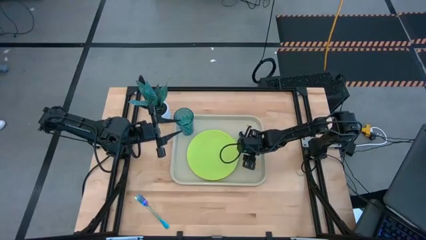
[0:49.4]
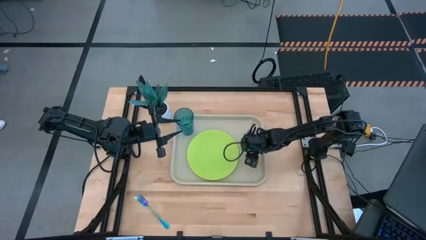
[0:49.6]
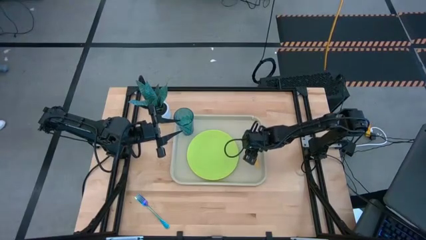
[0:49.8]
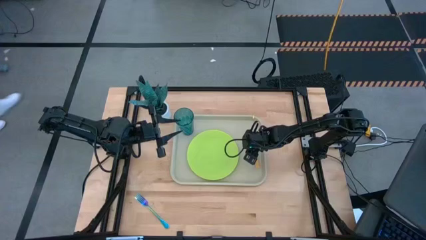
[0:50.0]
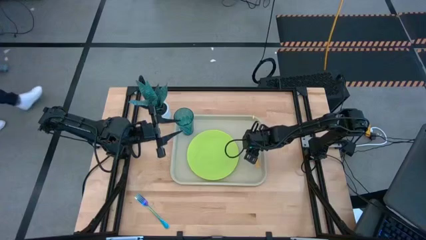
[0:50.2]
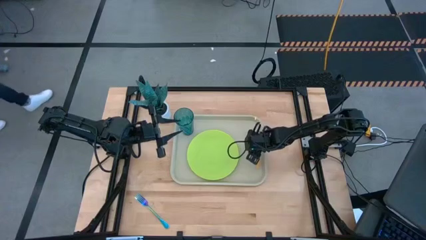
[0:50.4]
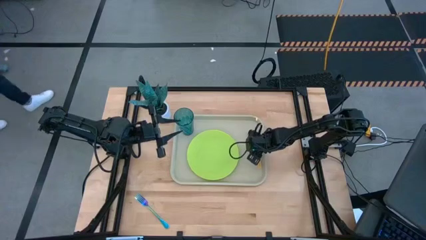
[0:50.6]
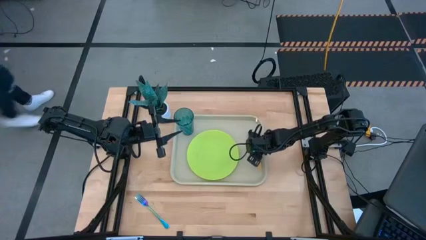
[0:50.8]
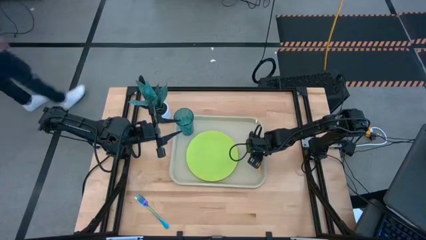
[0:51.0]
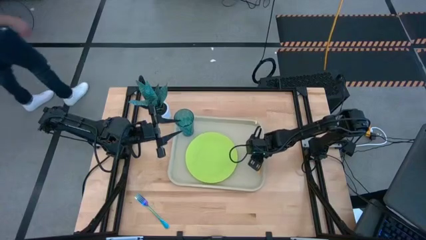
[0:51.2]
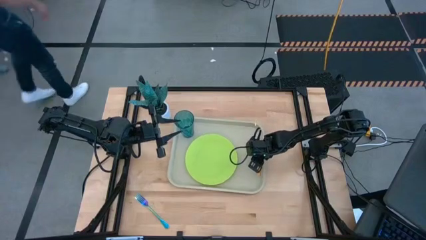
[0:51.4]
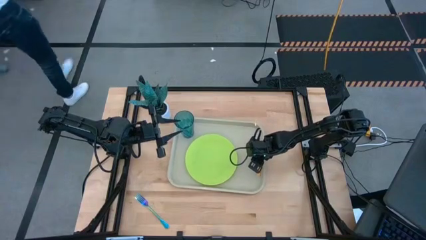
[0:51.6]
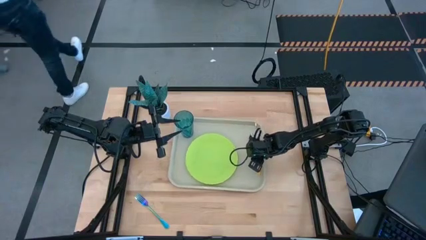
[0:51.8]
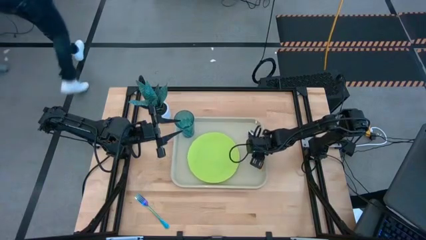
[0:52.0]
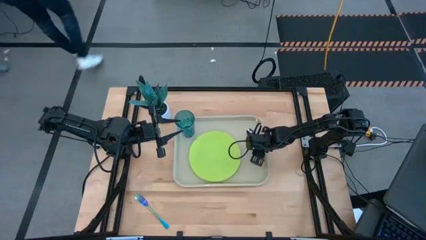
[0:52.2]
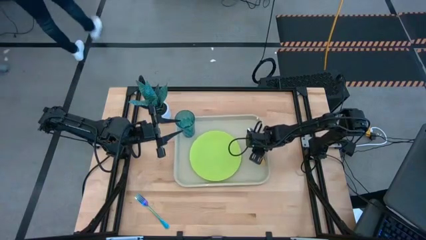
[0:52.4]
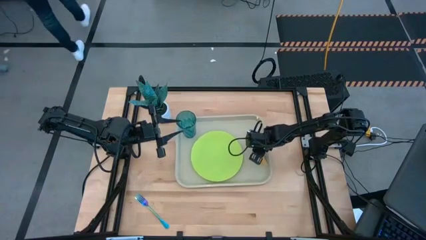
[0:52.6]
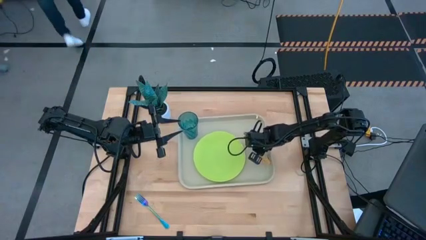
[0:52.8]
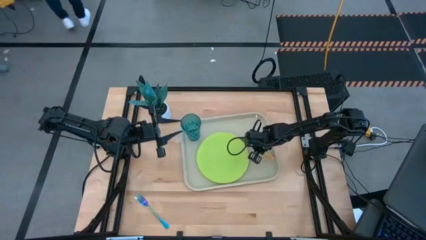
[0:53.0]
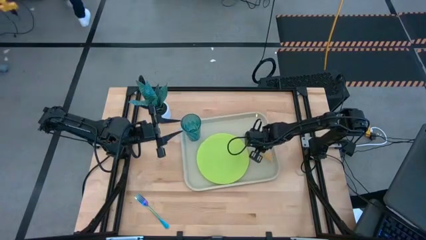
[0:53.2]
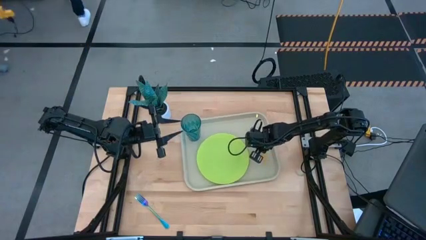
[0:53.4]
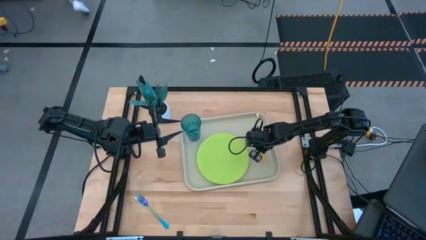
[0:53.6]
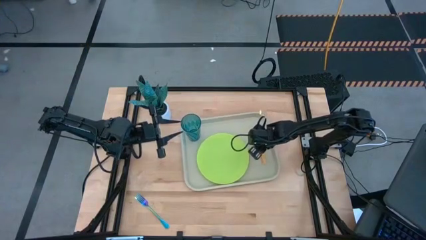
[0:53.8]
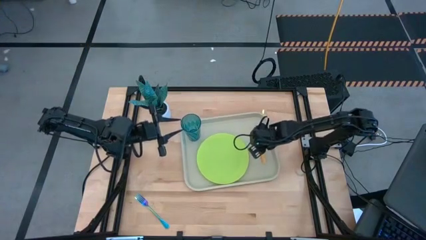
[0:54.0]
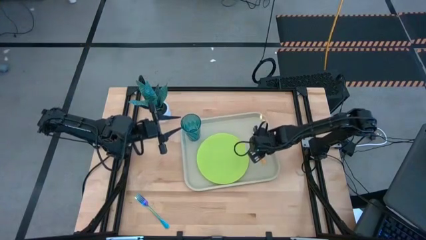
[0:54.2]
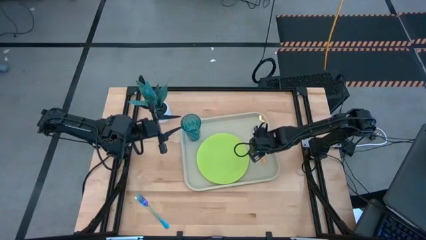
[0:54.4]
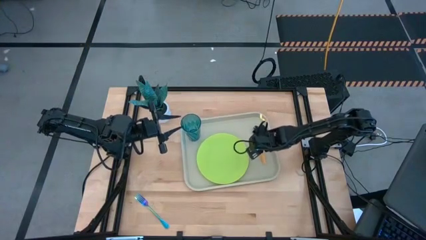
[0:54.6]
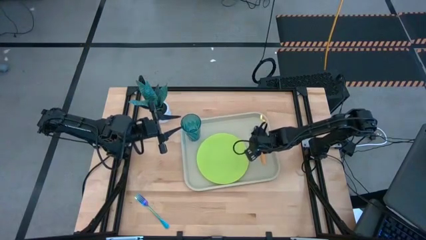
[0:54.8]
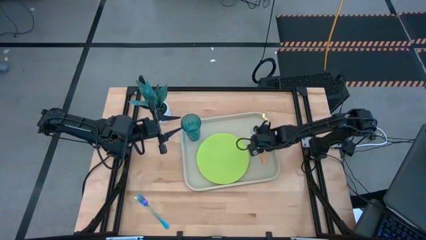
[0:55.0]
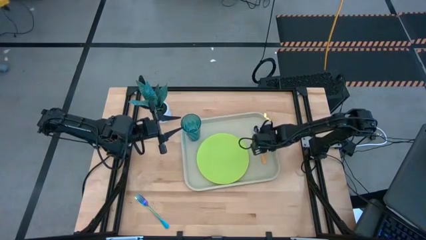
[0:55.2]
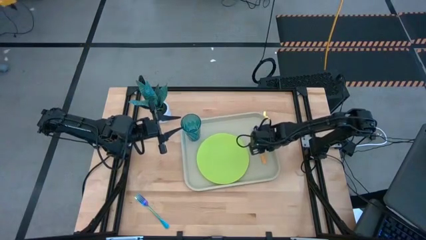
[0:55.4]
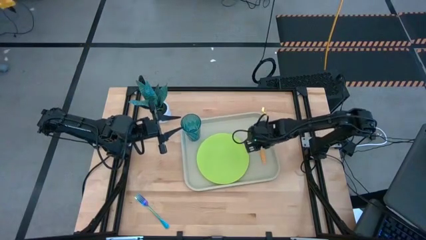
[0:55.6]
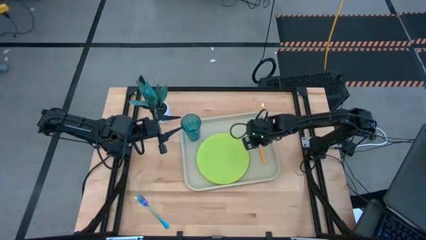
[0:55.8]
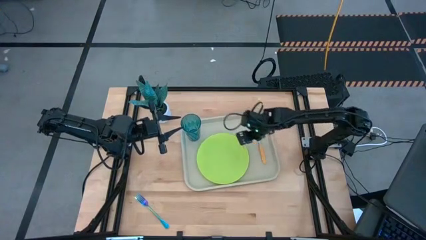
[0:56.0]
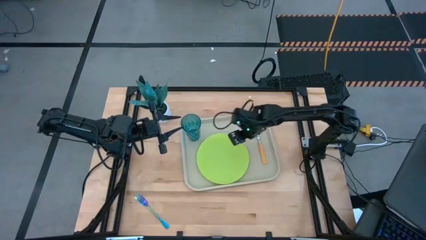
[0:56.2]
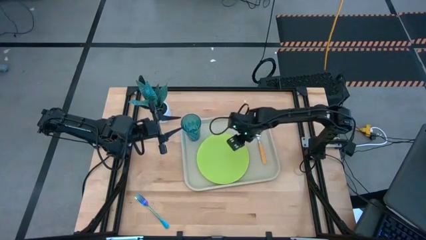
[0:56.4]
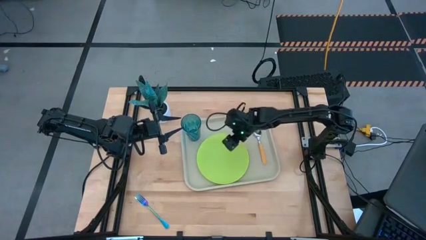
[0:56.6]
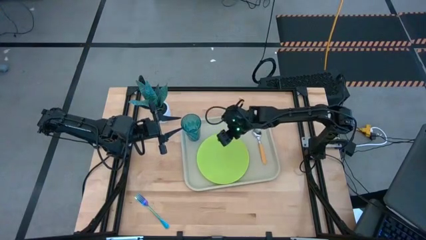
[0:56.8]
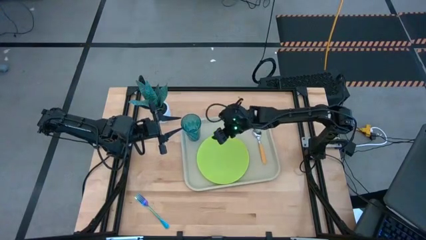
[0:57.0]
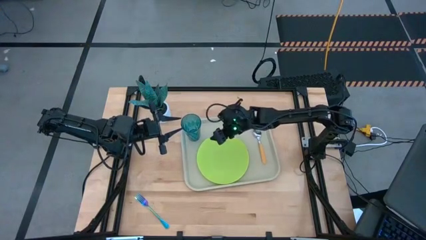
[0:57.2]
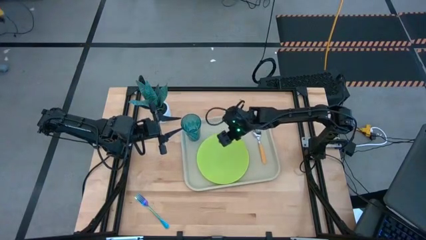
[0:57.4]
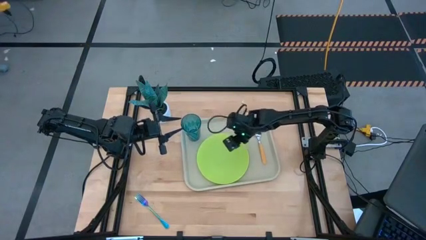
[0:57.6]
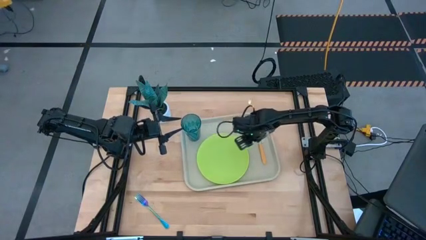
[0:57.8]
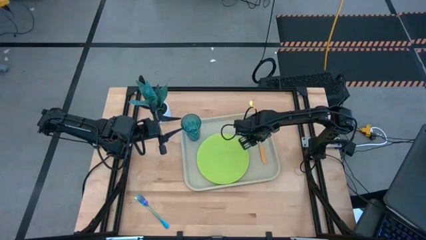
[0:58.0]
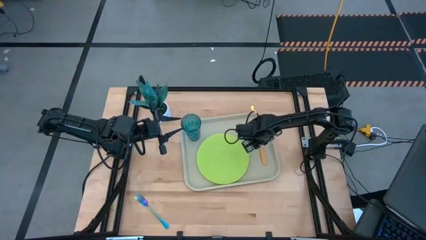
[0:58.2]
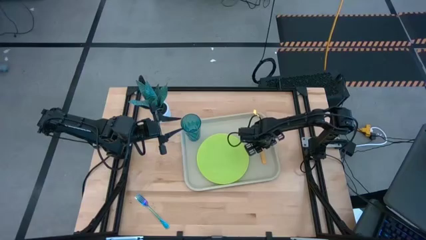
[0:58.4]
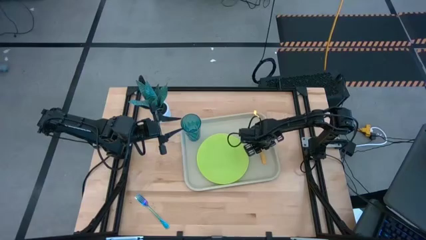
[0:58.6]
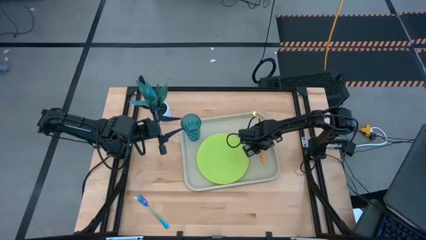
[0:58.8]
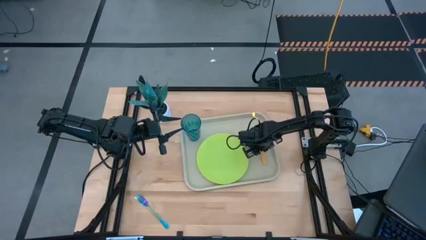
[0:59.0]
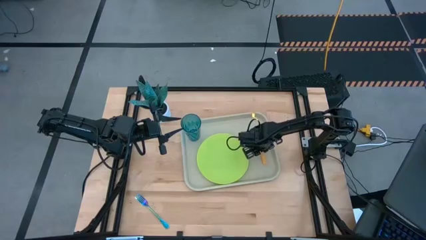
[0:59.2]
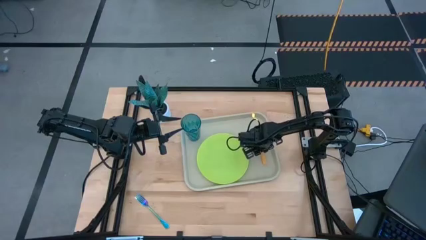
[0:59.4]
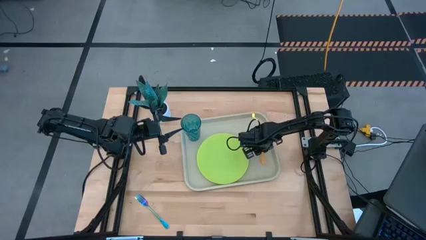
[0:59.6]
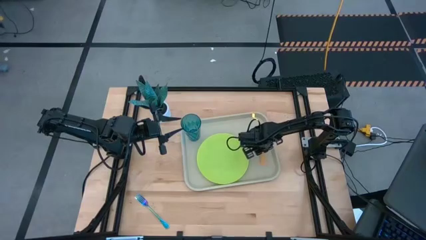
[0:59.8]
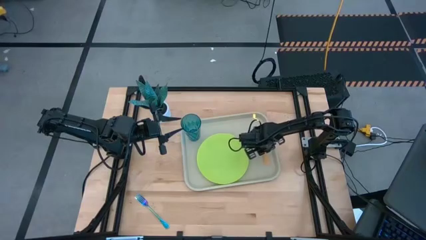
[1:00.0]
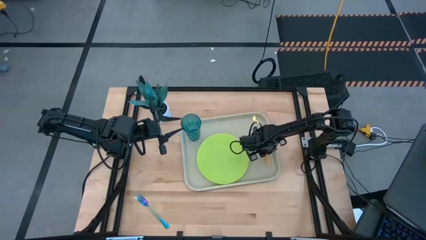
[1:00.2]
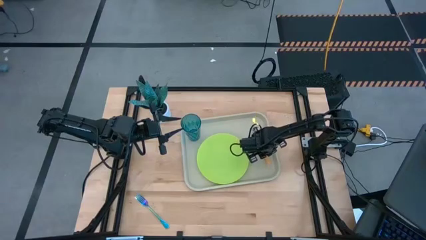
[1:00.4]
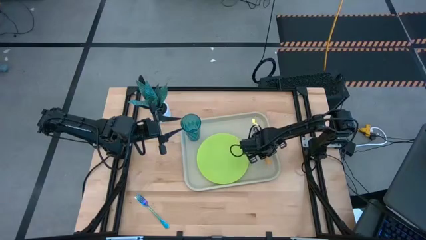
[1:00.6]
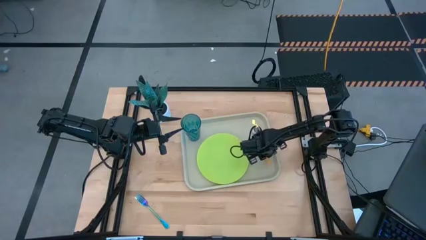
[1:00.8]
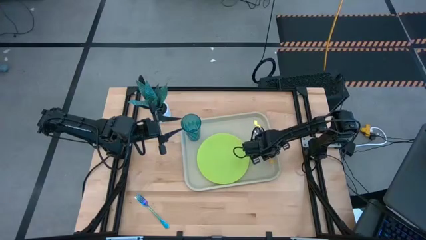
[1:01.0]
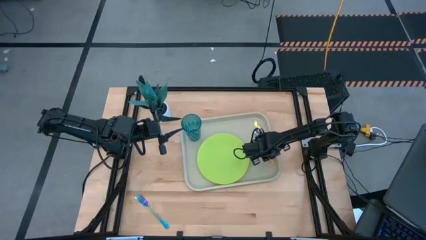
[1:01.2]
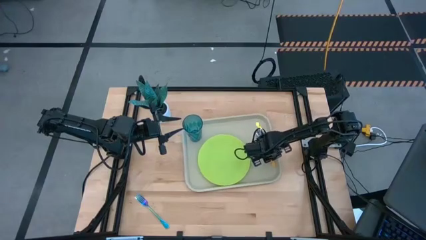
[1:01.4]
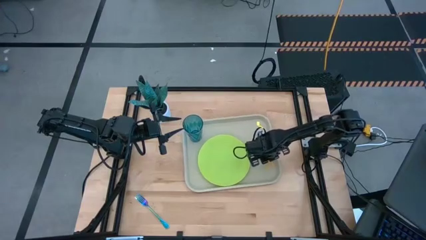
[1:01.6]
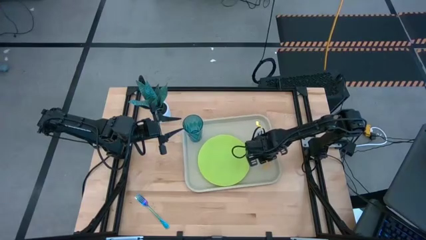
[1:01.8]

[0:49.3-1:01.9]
Task: Pick and place plate/cup/fork/spoon on tray
Put the orange spoon to the right side of the green plate on the food tray

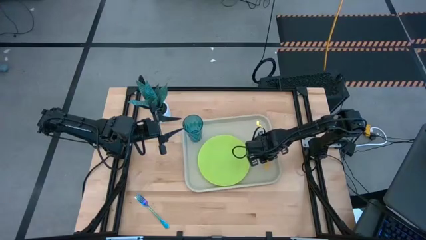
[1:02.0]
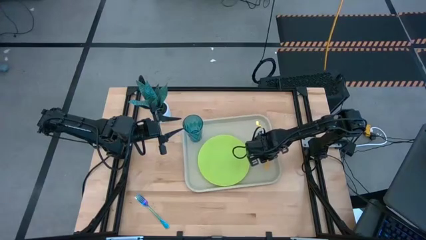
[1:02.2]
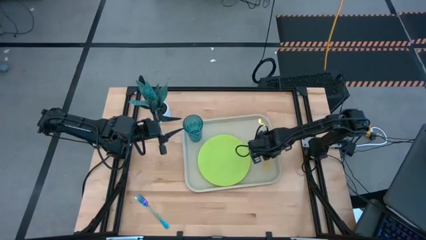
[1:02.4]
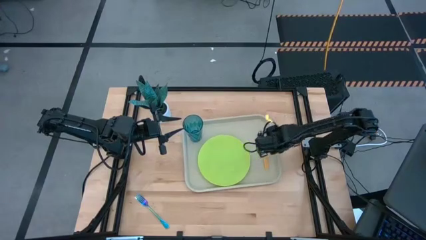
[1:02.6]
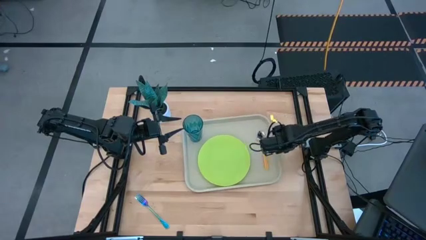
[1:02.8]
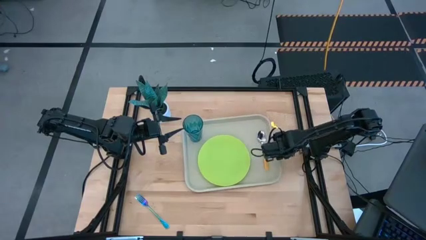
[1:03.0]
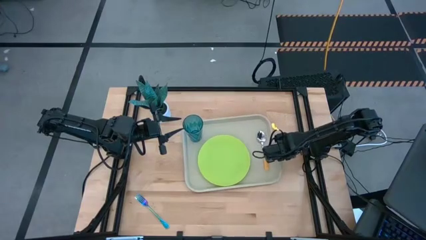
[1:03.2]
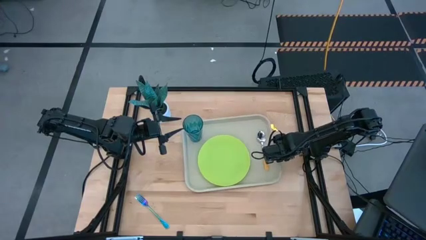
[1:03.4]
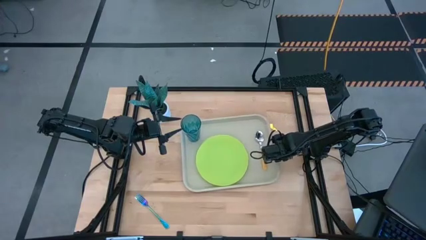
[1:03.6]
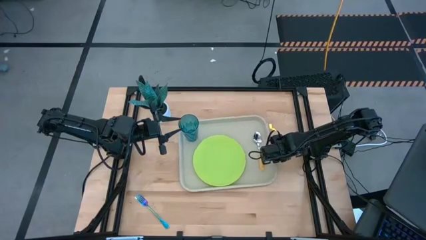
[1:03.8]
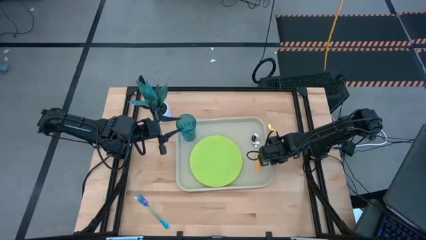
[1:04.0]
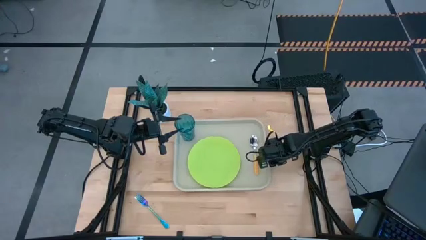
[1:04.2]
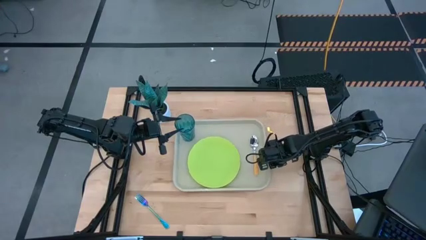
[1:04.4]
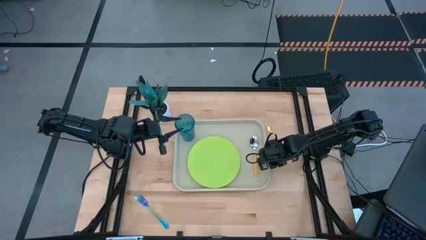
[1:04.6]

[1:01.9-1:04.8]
Adjust the white food tray
